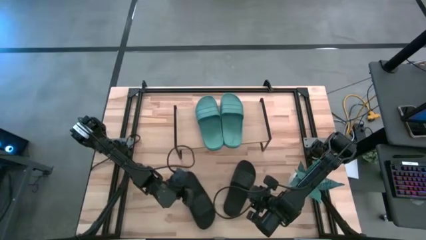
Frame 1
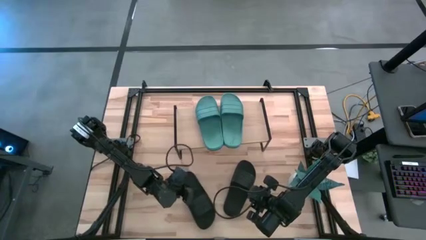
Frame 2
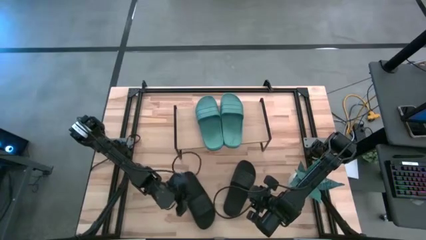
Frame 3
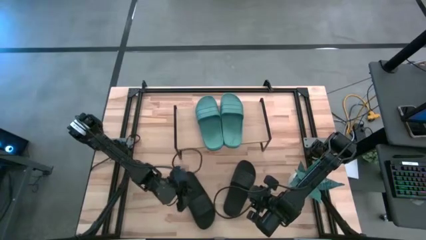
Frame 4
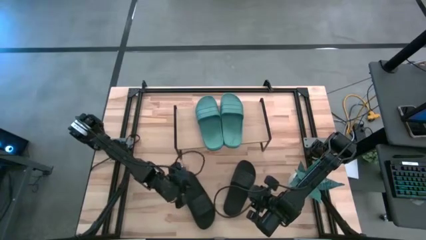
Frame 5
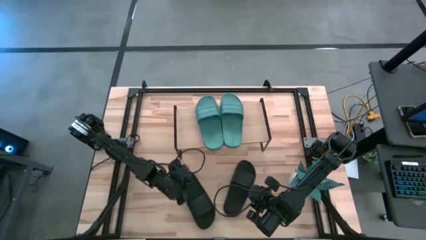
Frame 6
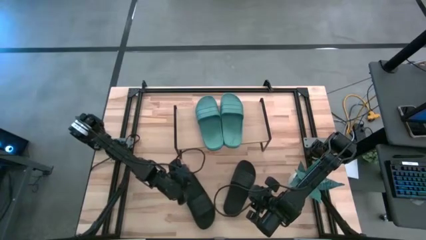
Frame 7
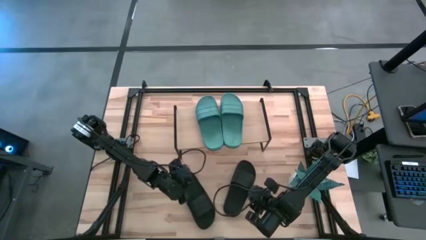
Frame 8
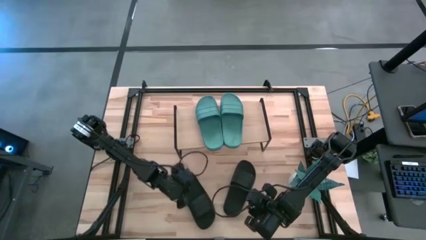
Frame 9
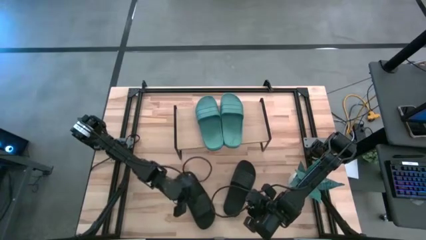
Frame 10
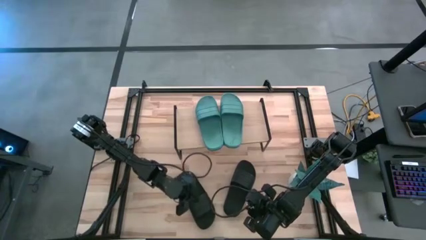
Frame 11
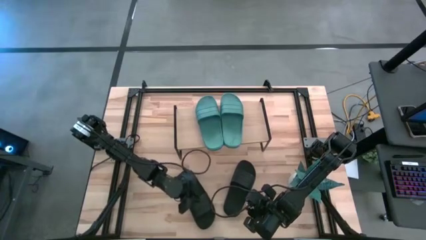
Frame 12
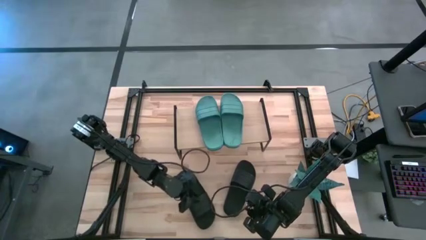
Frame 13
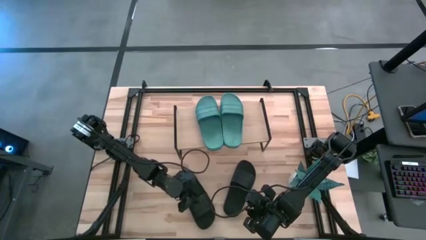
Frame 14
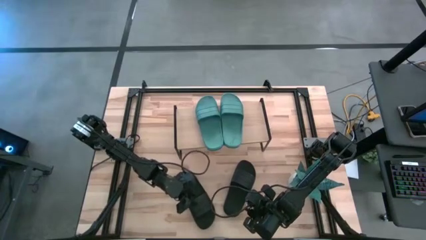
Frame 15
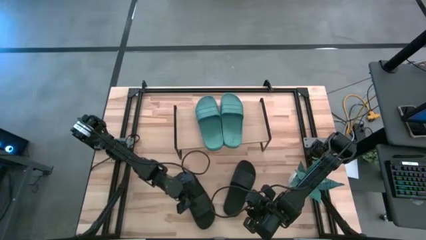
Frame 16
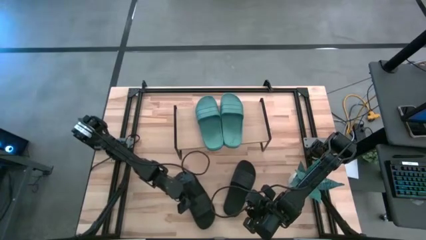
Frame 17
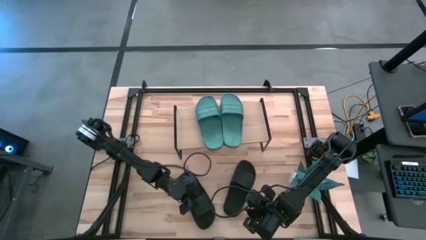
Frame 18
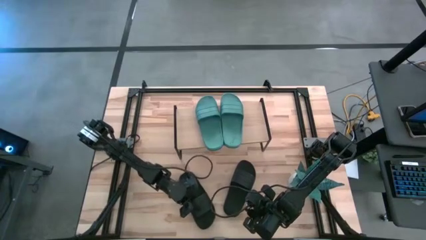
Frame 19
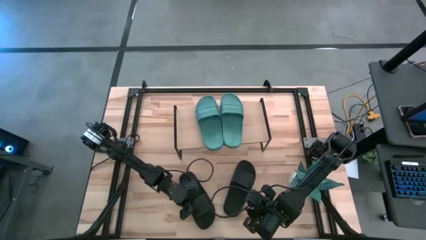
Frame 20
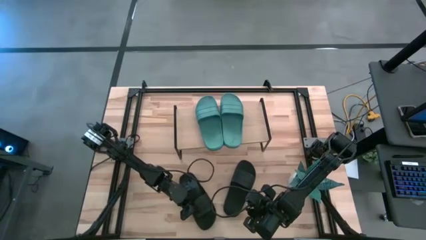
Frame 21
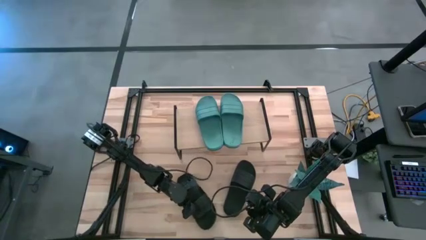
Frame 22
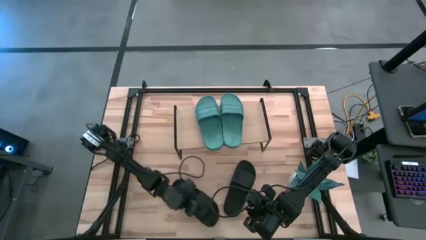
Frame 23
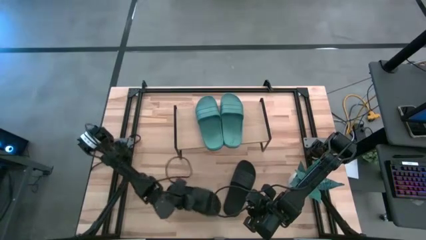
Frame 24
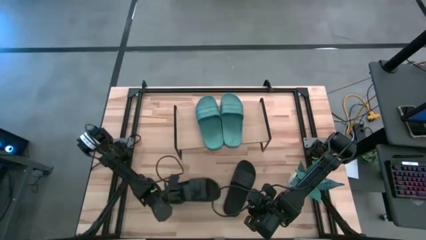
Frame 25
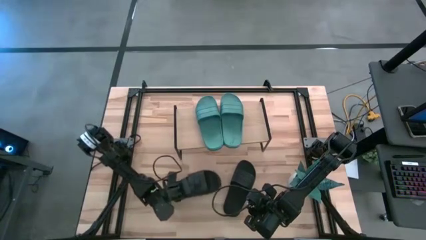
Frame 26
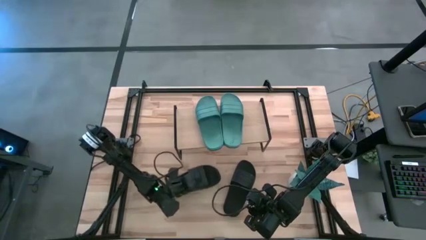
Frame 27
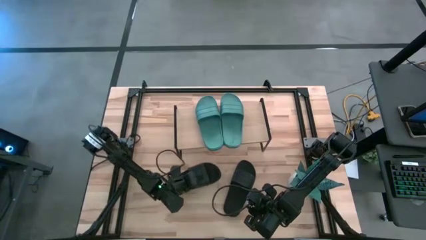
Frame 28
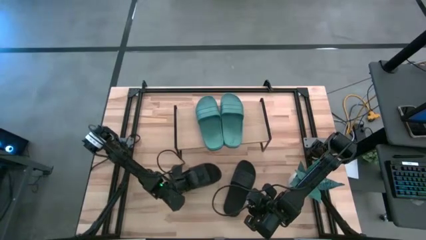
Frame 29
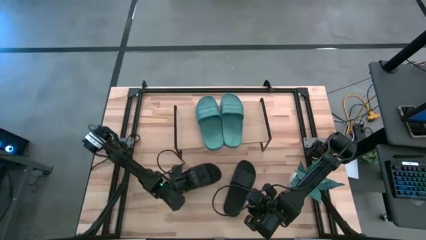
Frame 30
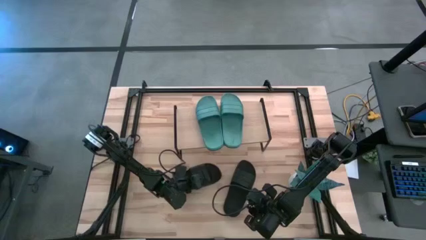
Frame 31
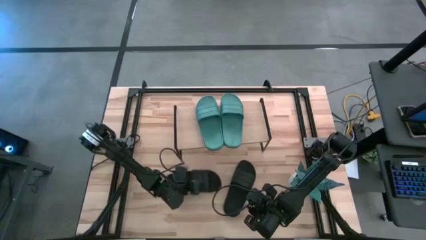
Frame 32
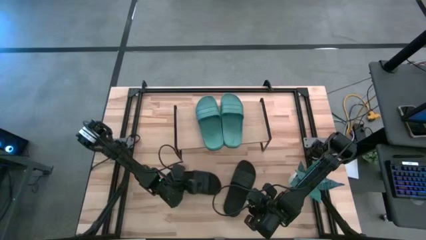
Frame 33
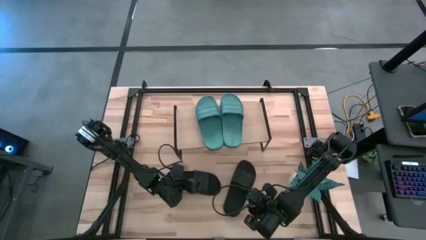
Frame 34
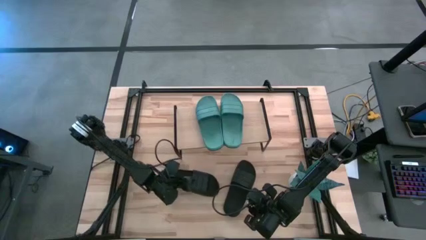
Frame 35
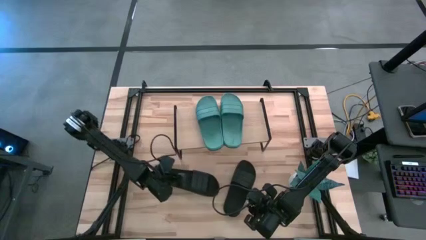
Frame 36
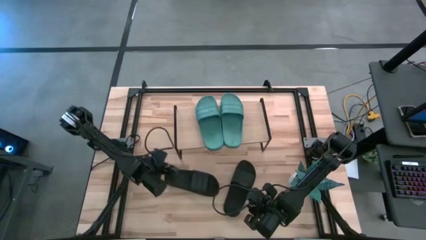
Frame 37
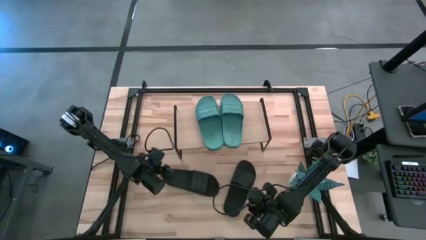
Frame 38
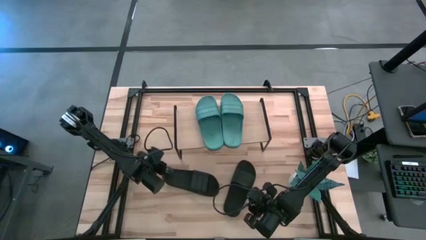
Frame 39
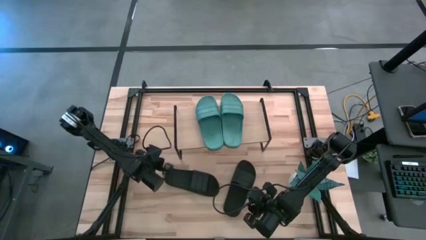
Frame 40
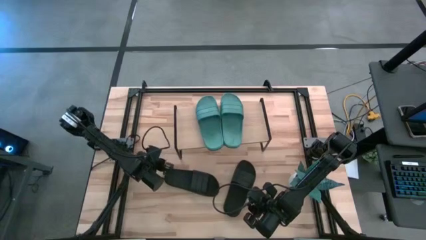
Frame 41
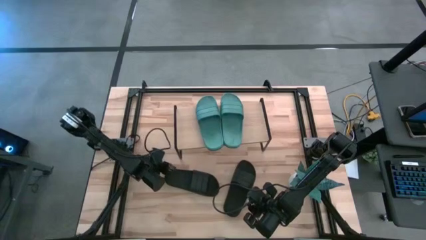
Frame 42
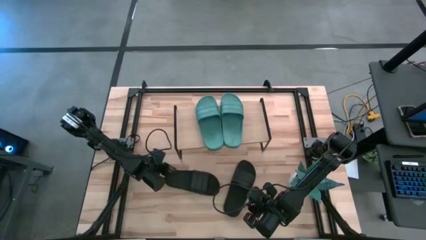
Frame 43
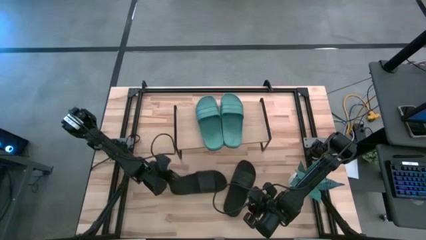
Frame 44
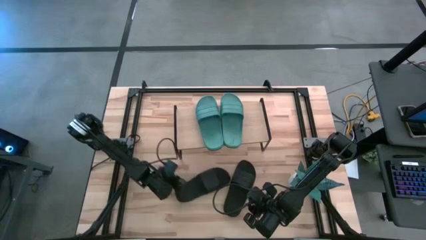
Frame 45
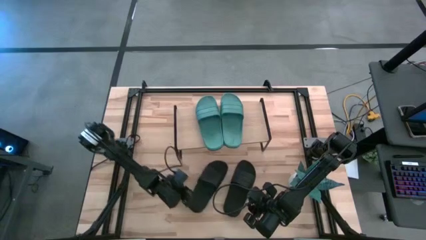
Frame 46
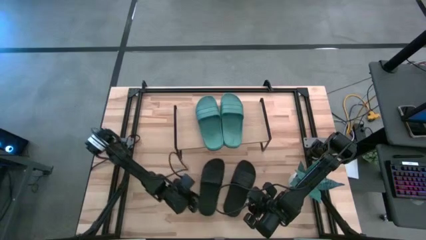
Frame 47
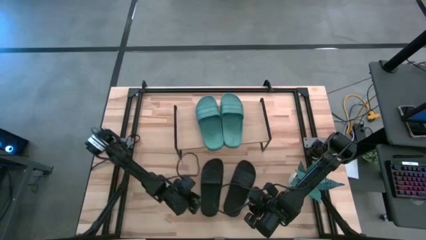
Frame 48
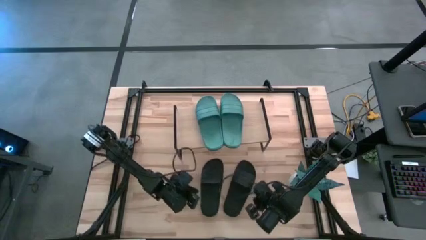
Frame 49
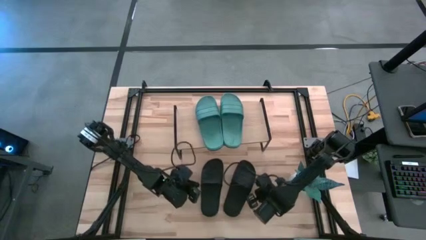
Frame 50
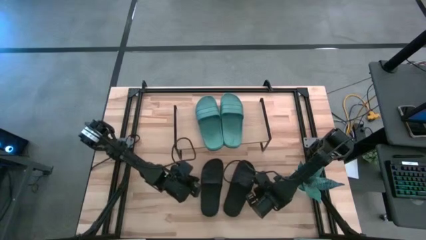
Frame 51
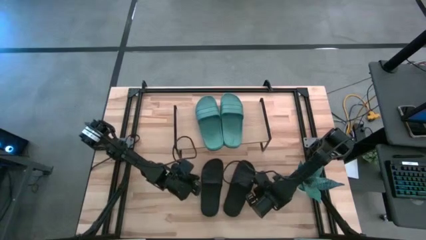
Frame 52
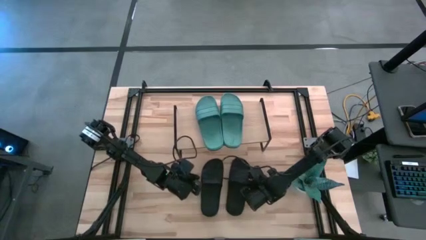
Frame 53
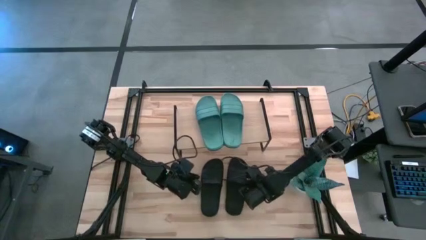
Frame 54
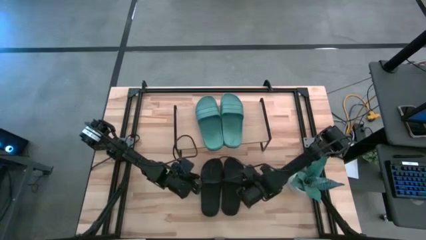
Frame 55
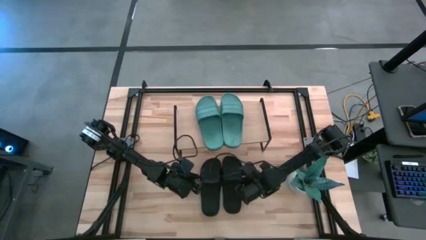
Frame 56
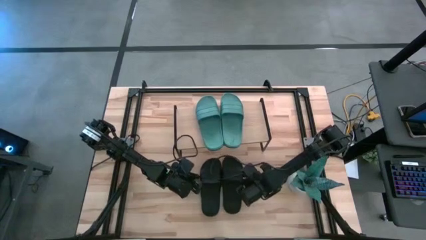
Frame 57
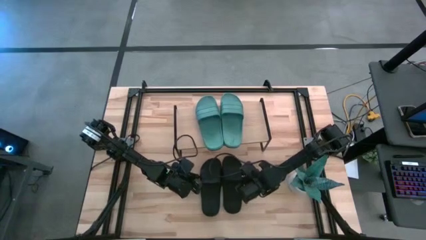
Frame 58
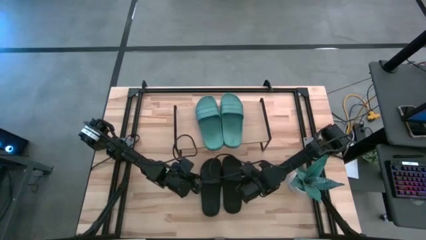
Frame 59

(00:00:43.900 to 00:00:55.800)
Task: Pick and place slides into the shelf
Adjust the black slipper

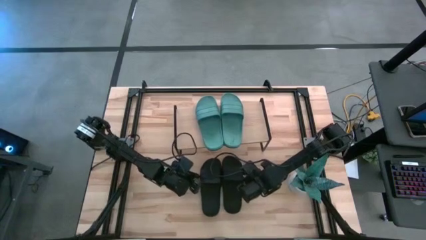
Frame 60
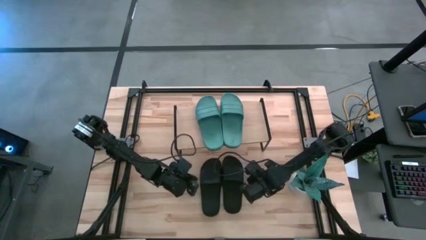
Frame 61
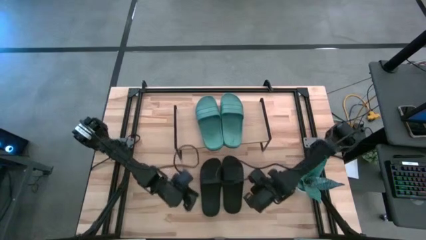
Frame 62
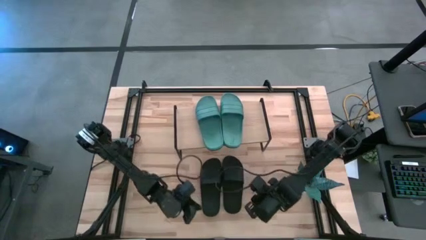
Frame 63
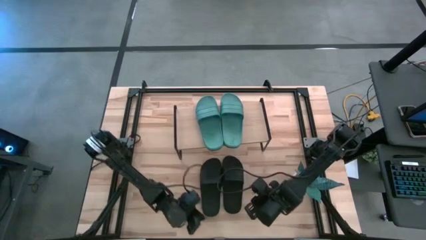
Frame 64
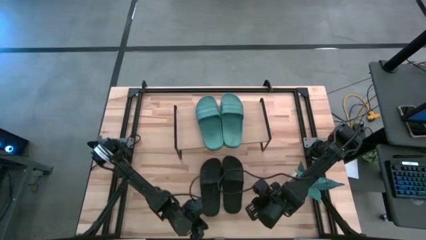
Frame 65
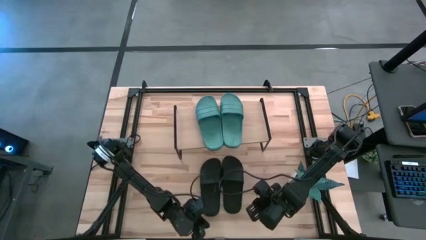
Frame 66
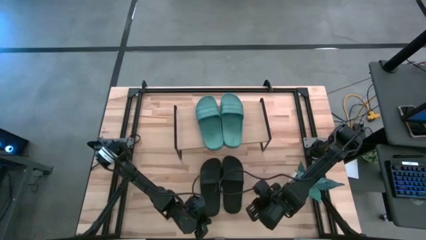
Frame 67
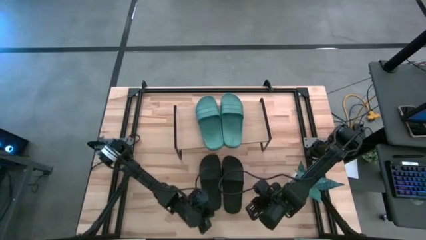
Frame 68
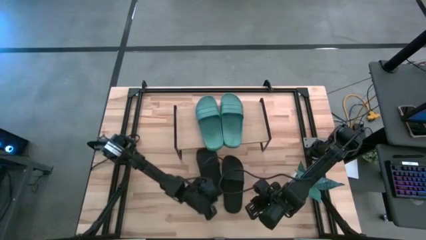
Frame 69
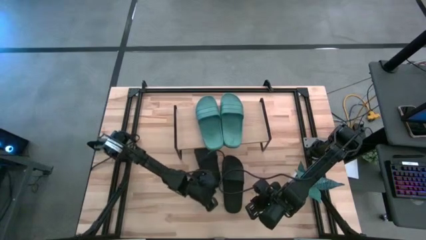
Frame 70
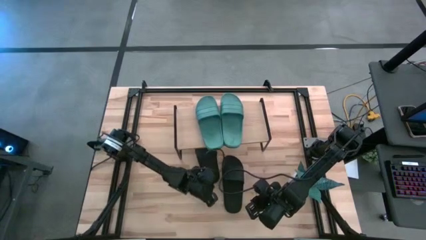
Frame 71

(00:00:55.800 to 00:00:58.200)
Move the left black slipper from the center of the table under the shelf

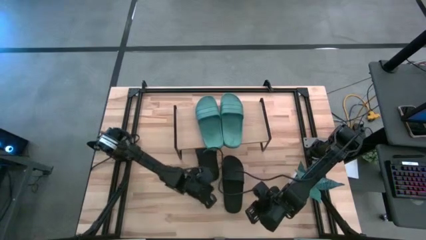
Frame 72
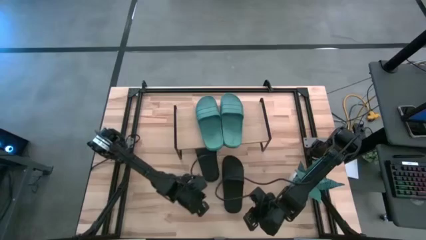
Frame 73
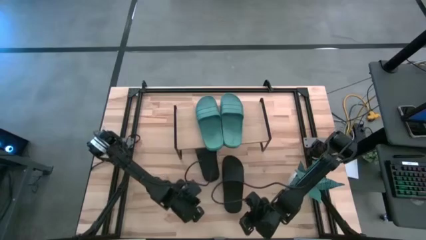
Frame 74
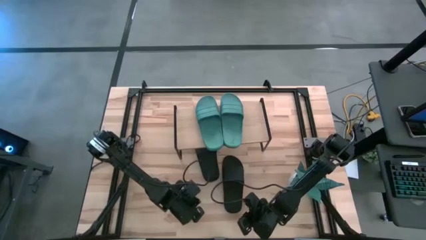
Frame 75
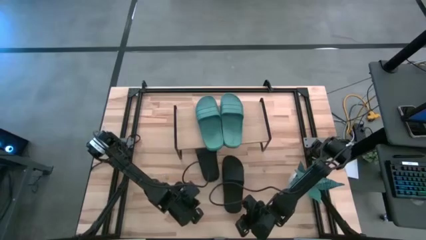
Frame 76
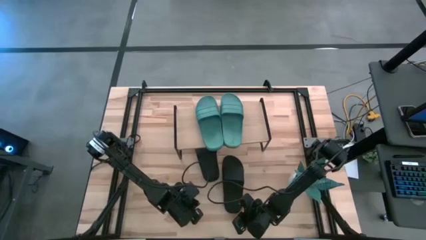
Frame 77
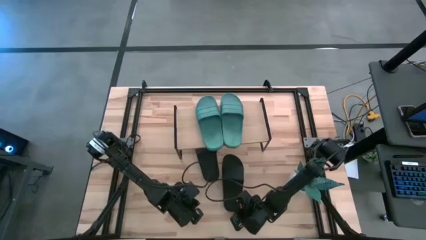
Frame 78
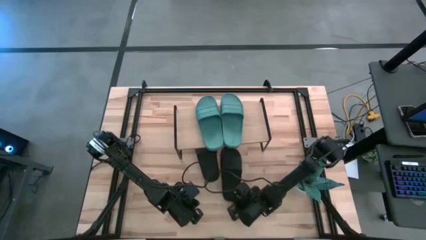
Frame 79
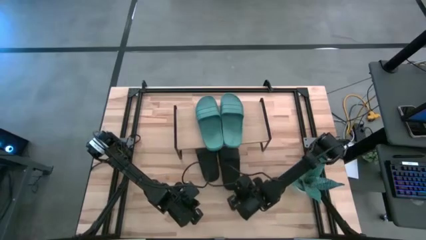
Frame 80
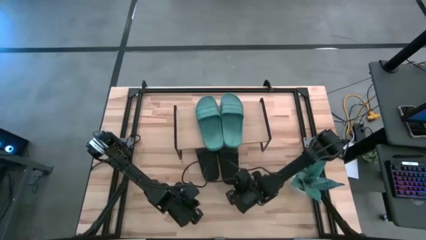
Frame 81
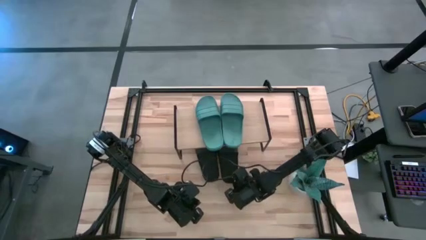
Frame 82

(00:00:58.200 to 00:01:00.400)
Move the right black slipper from the center of the table under the shelf
